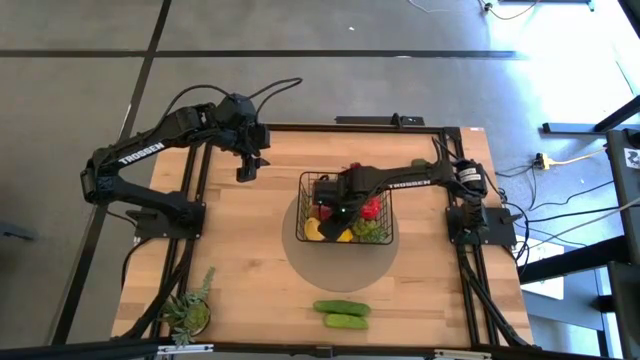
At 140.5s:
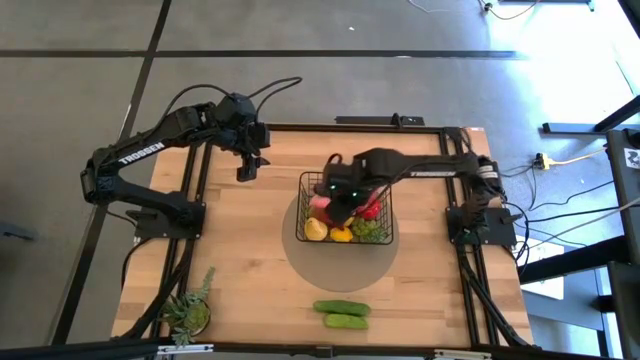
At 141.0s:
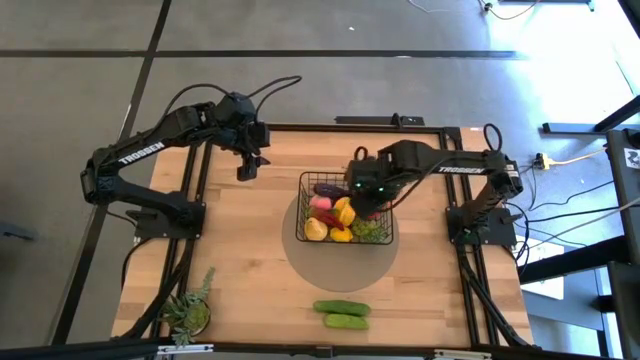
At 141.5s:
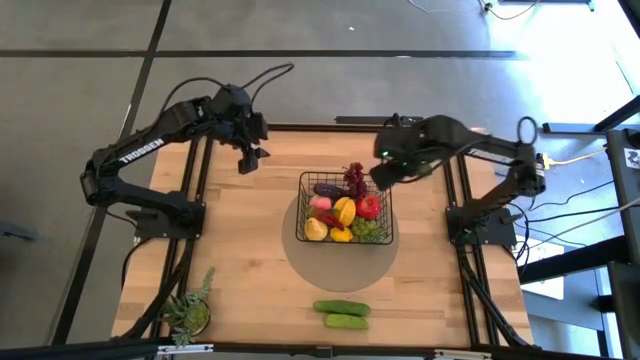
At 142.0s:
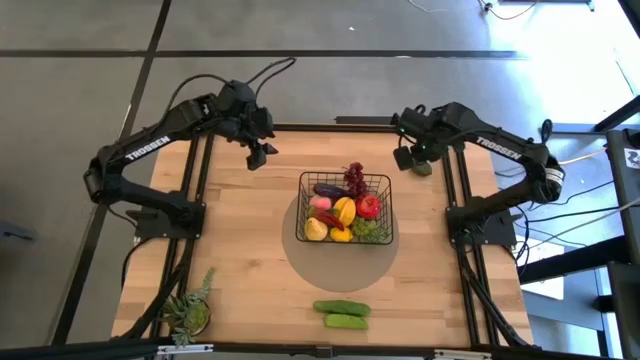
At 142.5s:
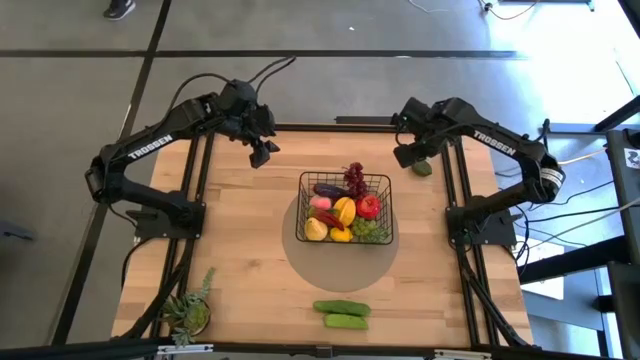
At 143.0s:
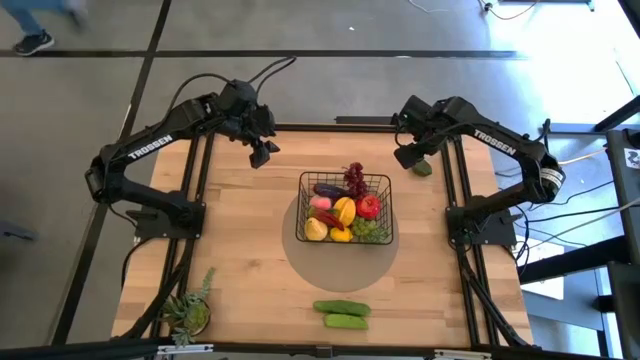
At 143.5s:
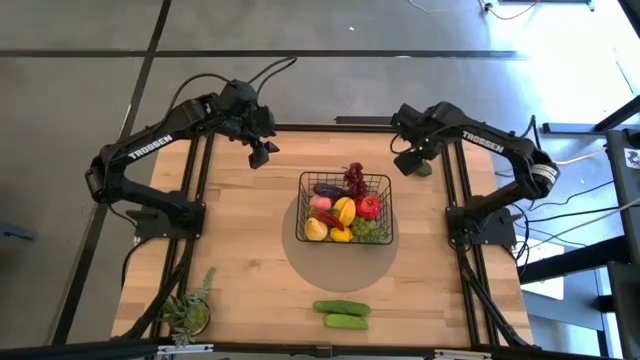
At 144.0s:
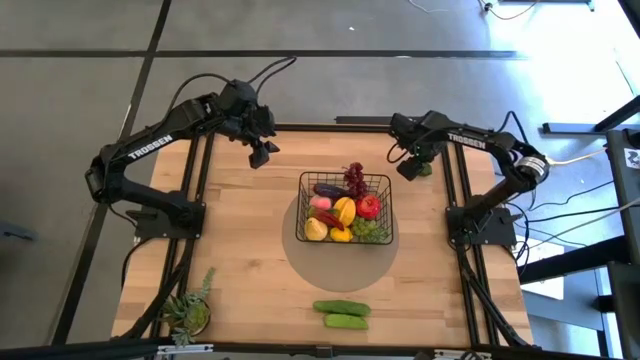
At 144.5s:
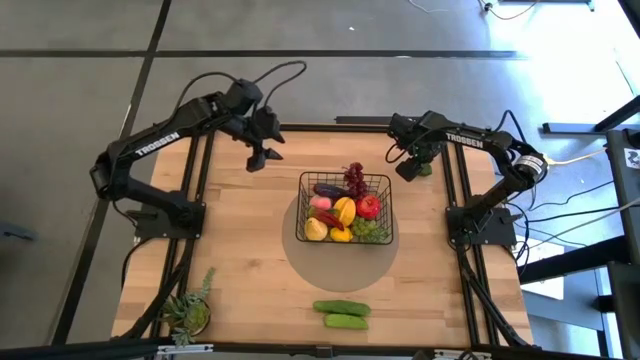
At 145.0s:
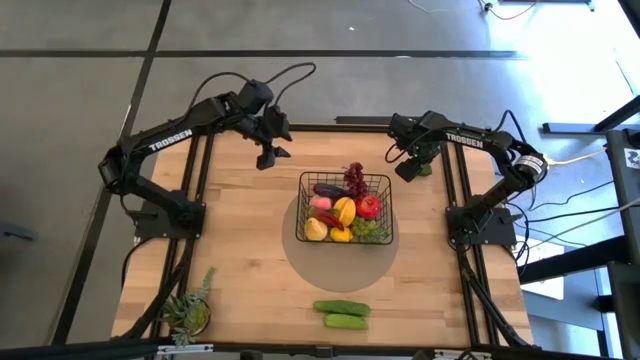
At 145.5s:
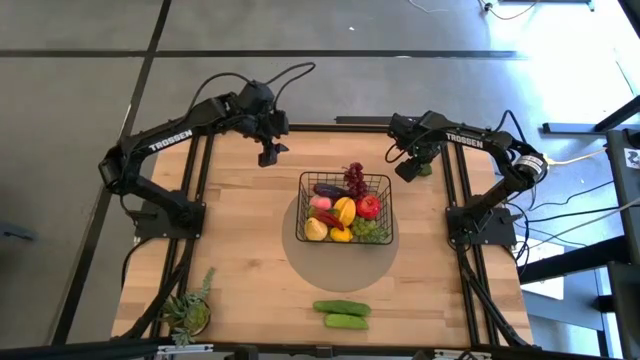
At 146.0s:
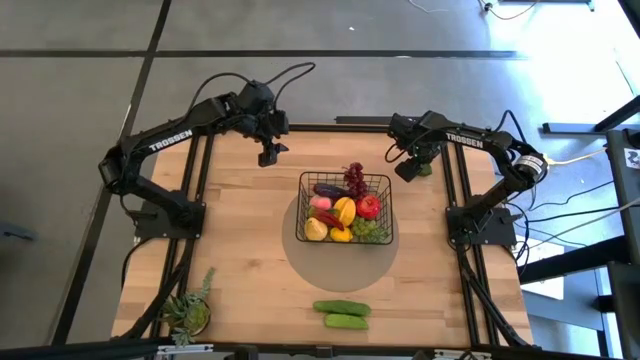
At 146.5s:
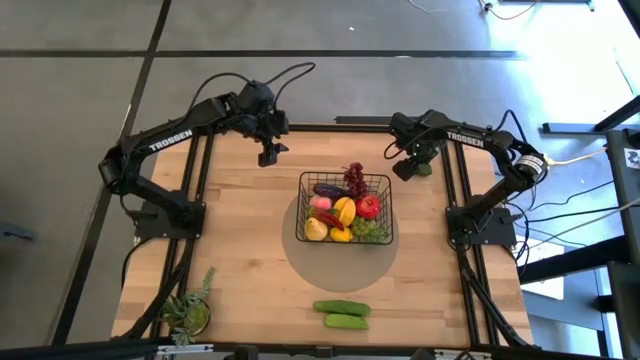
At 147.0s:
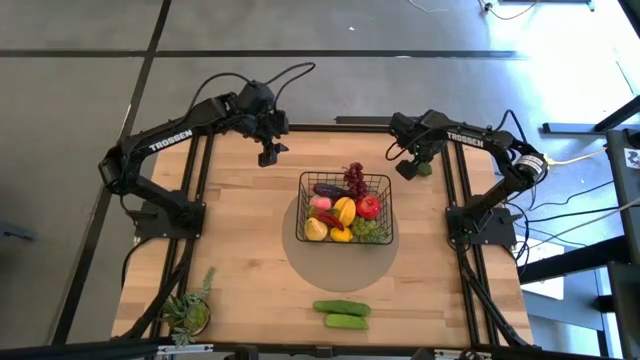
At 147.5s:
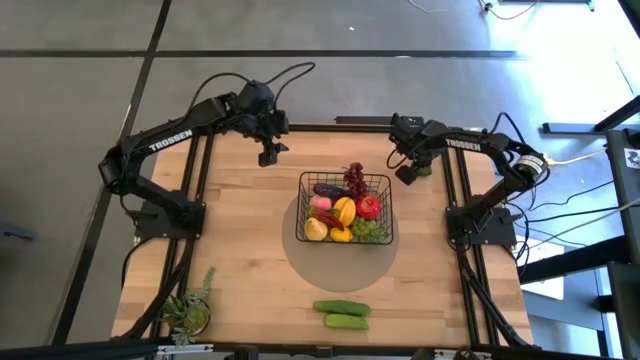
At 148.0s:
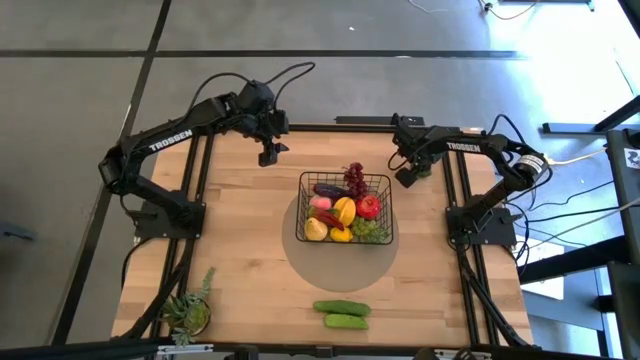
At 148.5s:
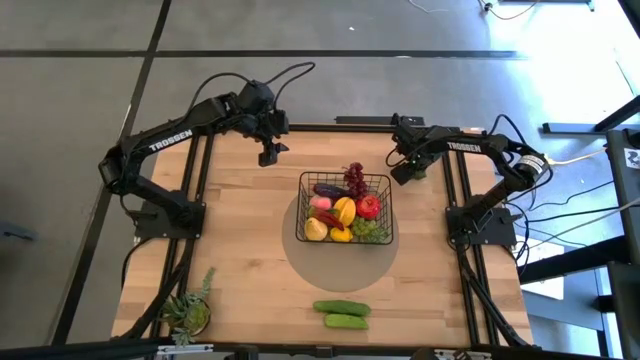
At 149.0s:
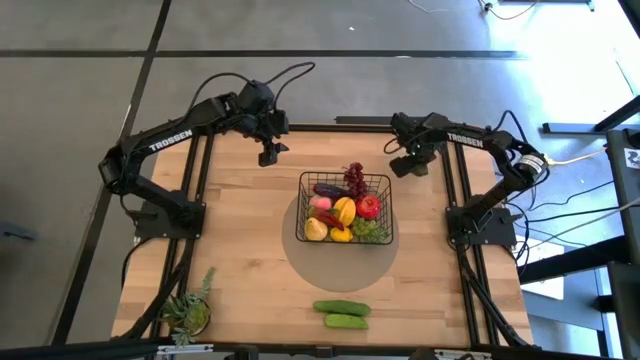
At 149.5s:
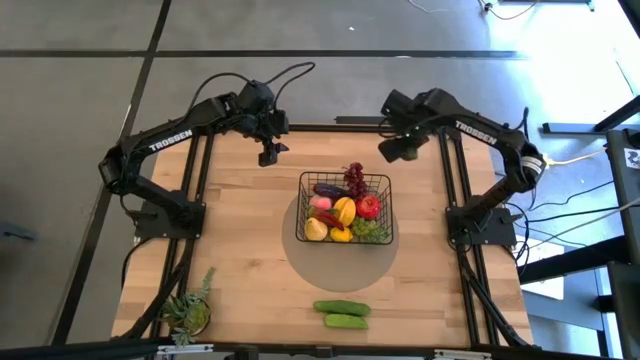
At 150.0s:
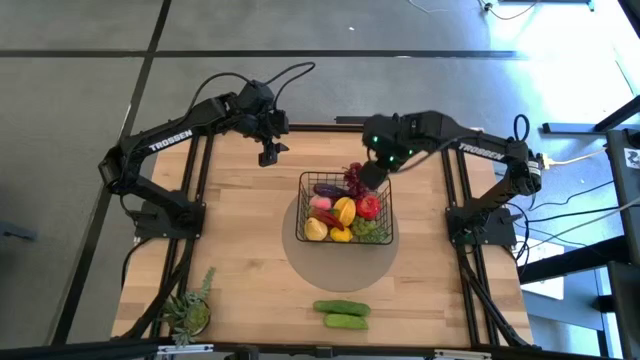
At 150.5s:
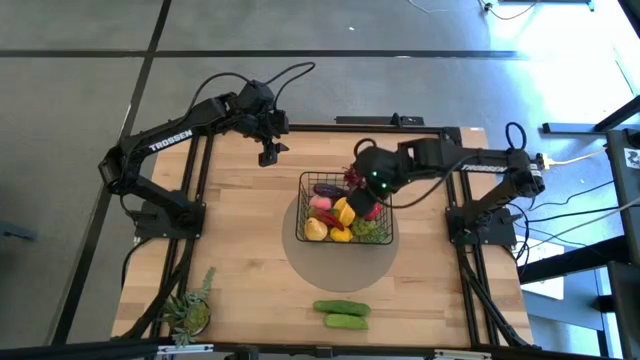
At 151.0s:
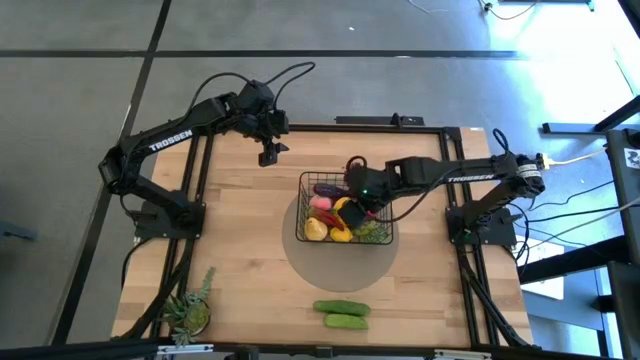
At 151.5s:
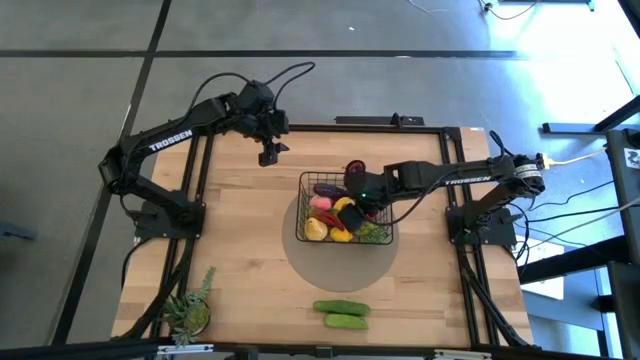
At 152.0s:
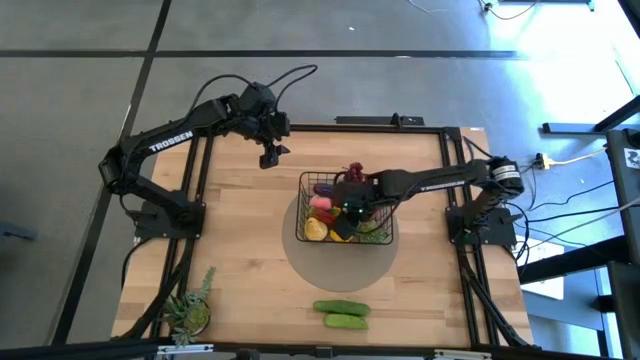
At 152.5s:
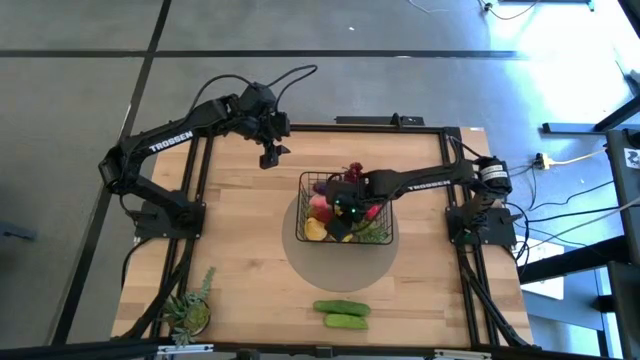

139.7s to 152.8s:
Task: Build produce basket
Put the green lime into the black wire basket

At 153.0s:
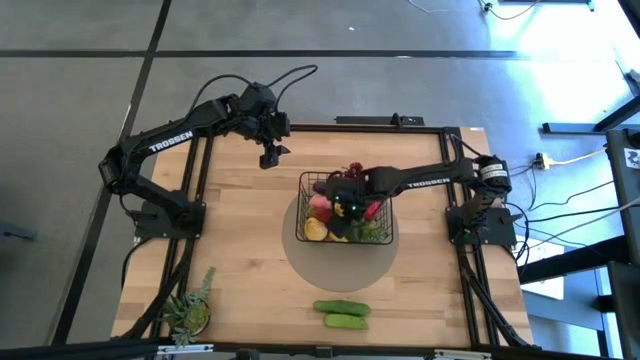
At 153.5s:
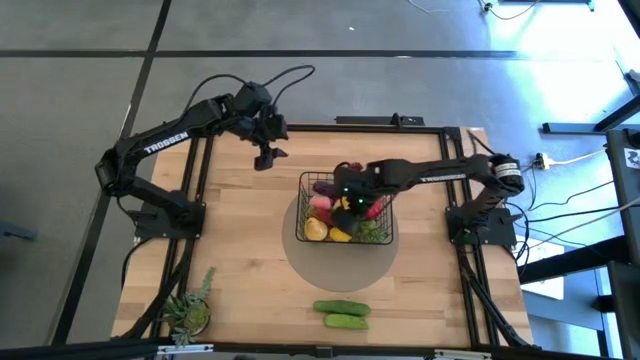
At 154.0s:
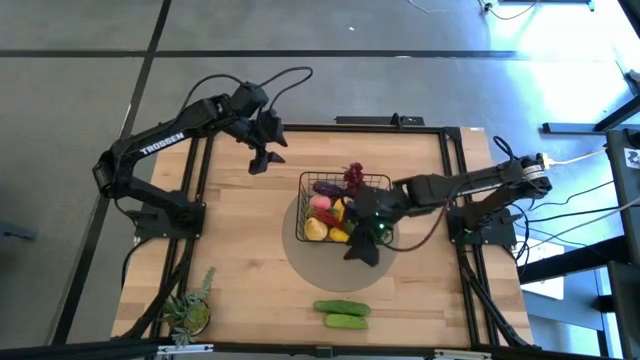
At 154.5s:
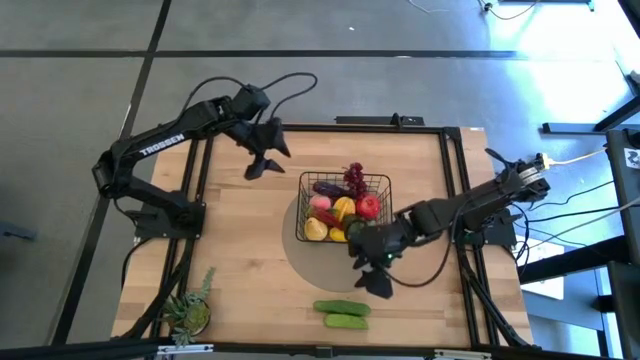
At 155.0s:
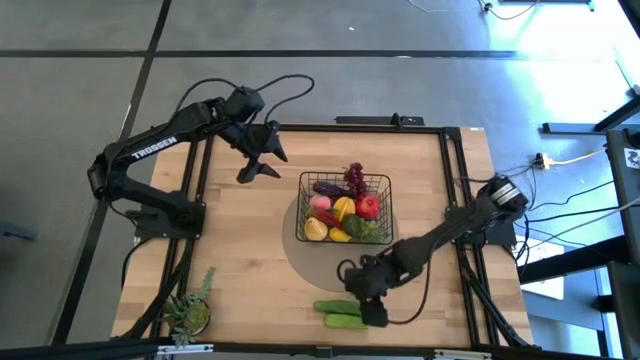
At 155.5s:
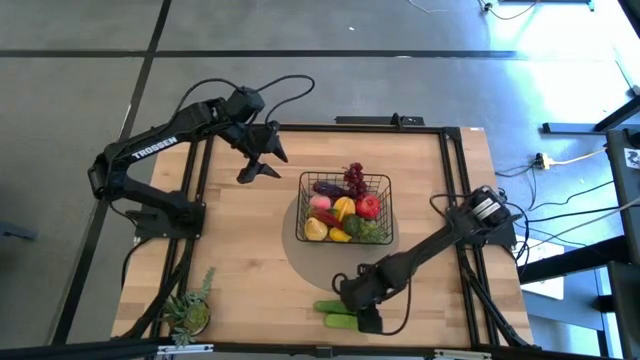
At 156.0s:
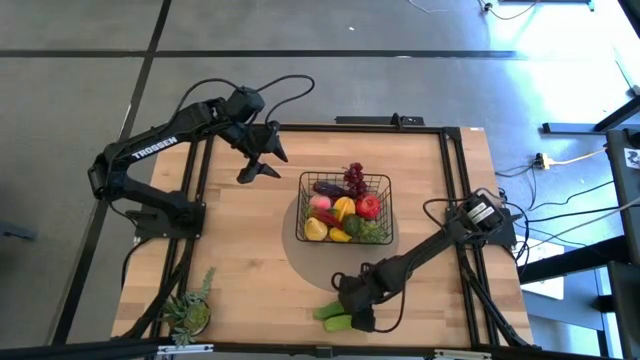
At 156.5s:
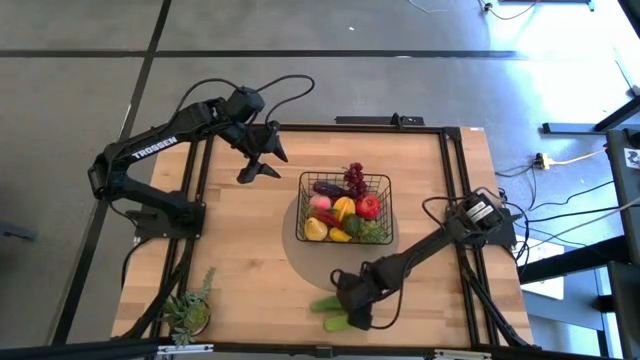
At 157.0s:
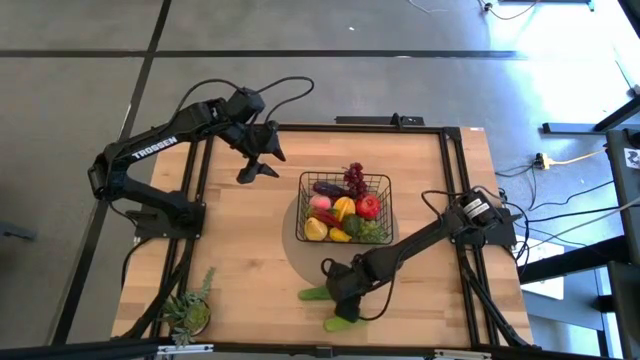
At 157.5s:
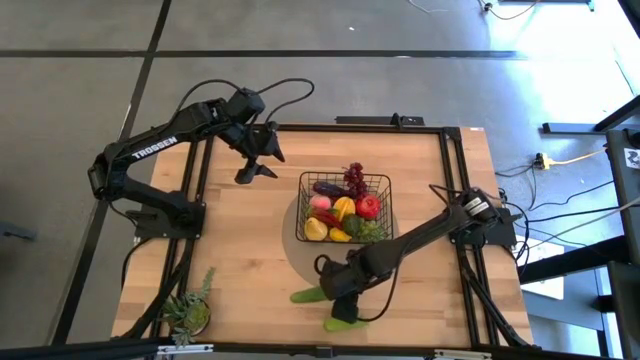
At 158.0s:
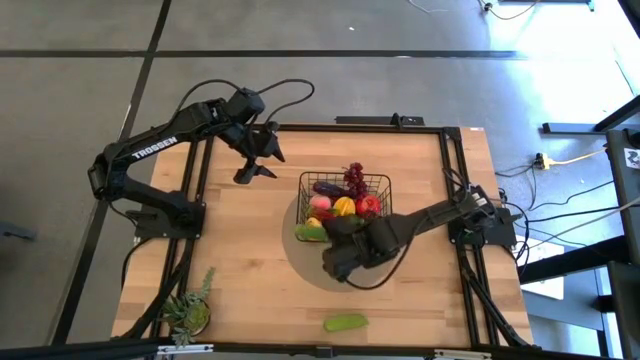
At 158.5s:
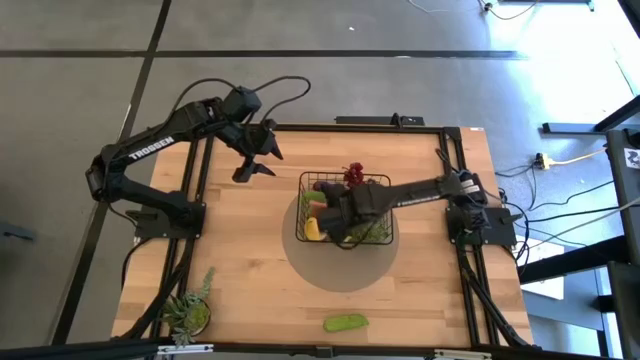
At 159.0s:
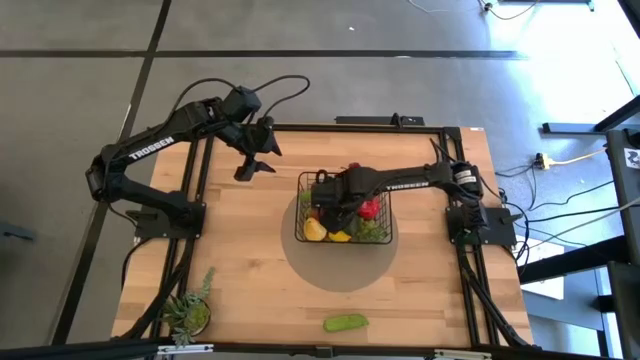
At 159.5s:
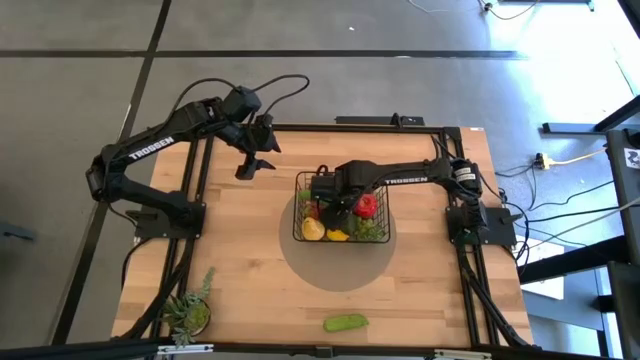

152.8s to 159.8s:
Put the top green cucumber into the black wire basket

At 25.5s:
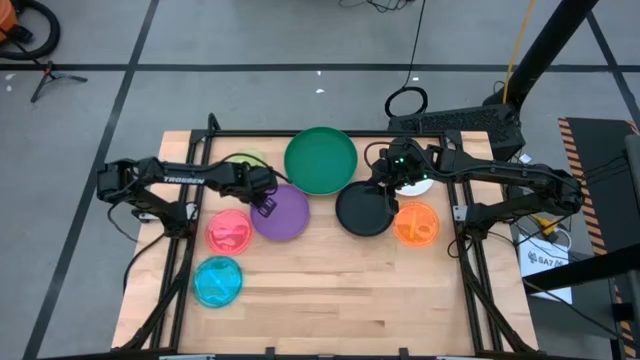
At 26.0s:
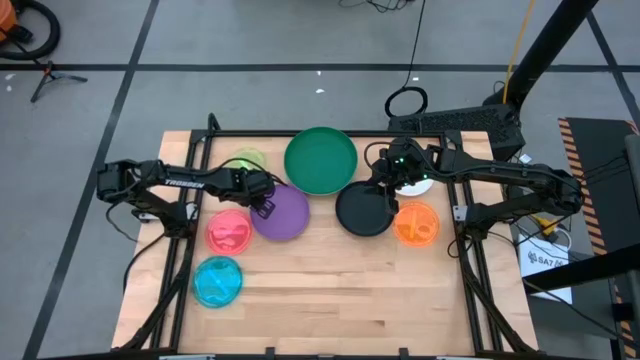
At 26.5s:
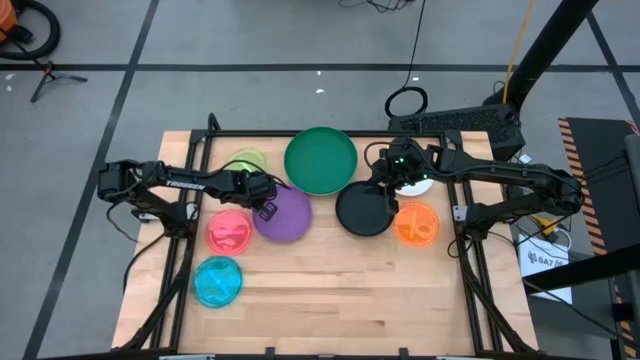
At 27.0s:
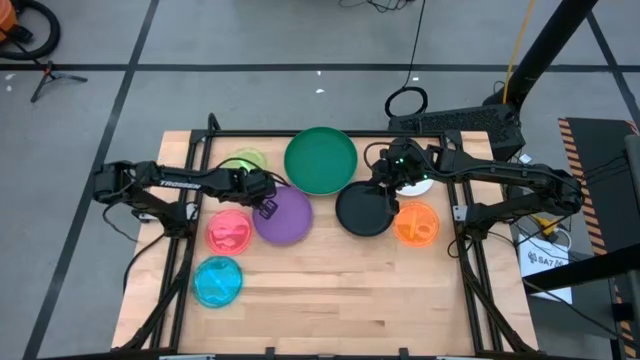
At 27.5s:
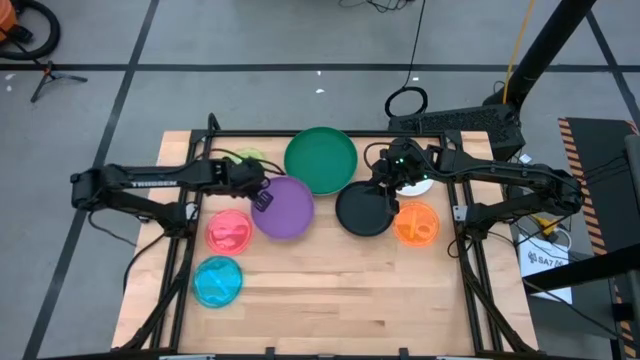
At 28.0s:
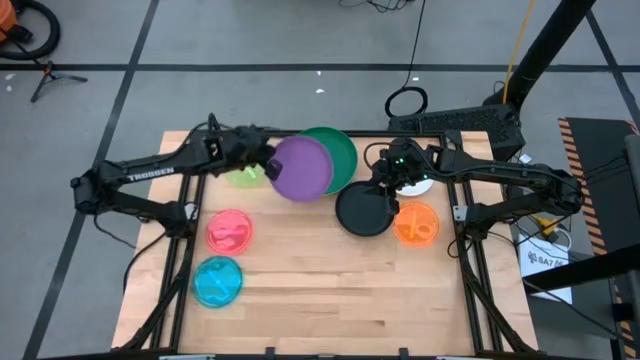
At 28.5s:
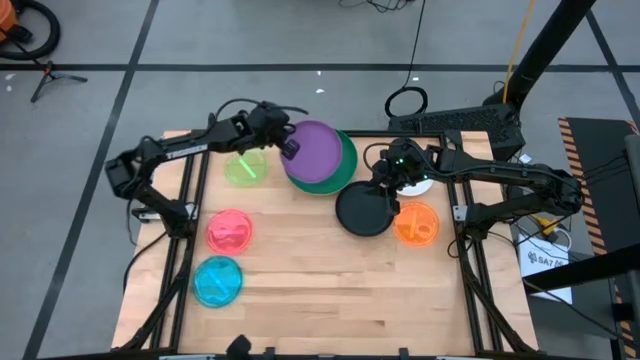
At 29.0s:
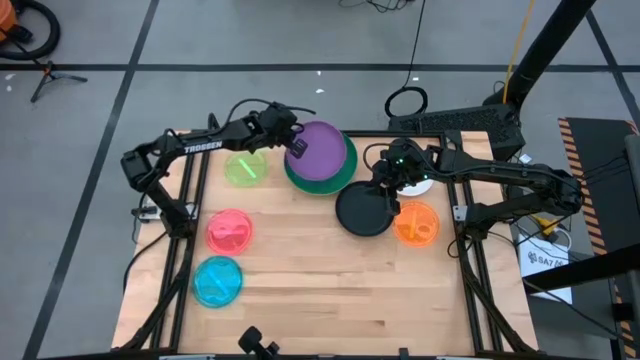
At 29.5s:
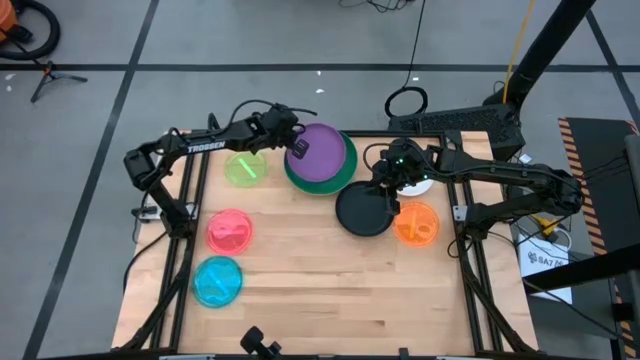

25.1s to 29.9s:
Task: Stack plastic plates
Stack the purple plate on top the dark green plate
